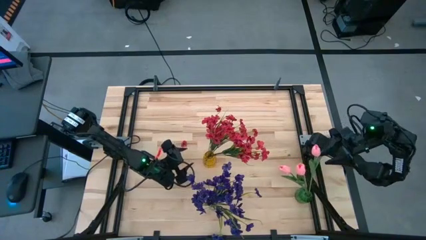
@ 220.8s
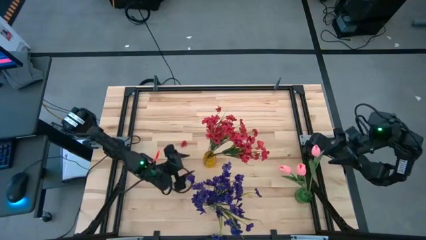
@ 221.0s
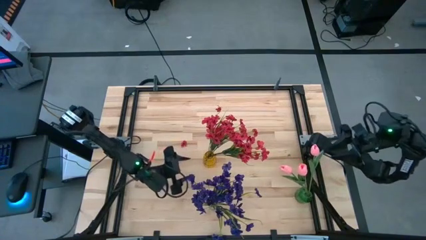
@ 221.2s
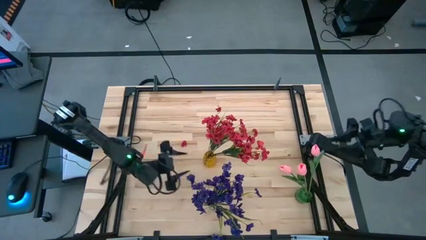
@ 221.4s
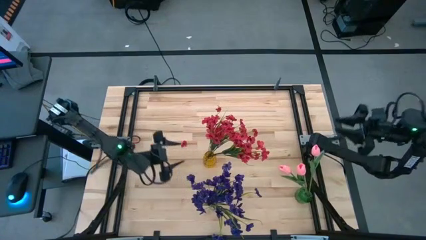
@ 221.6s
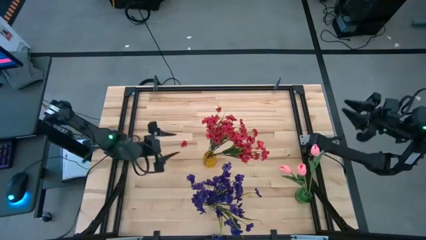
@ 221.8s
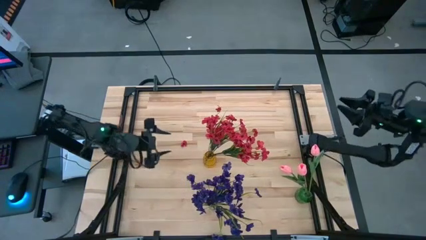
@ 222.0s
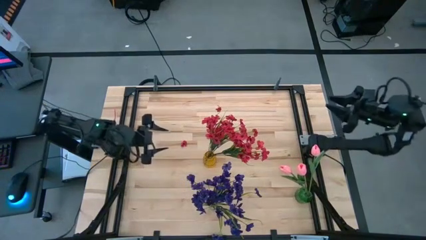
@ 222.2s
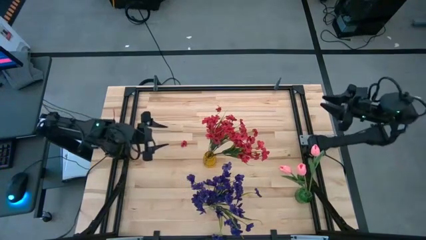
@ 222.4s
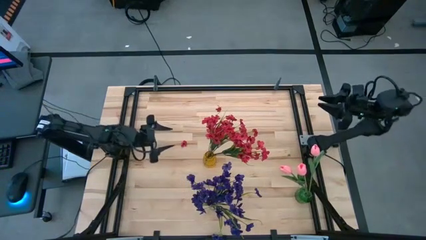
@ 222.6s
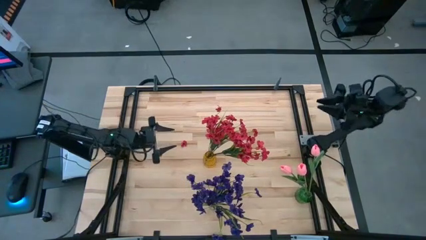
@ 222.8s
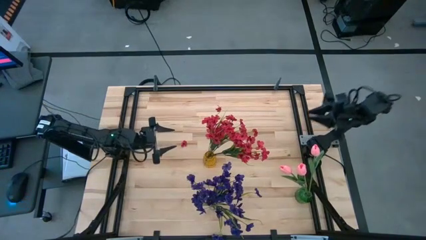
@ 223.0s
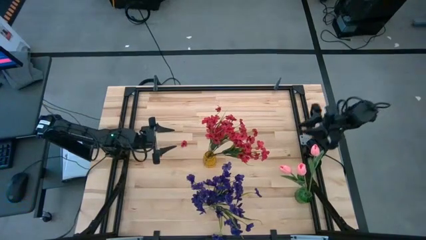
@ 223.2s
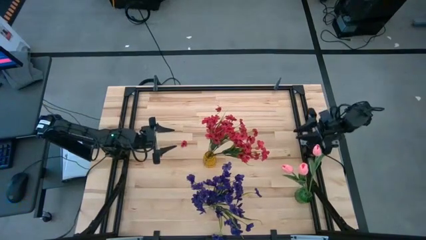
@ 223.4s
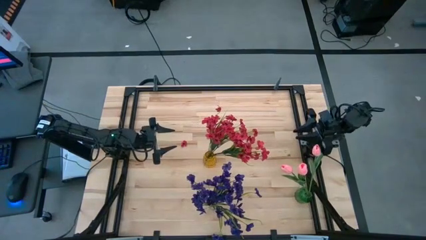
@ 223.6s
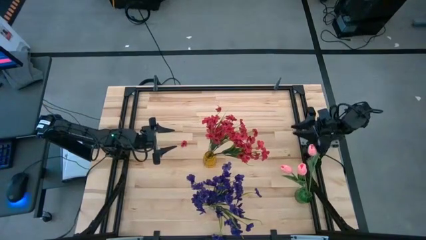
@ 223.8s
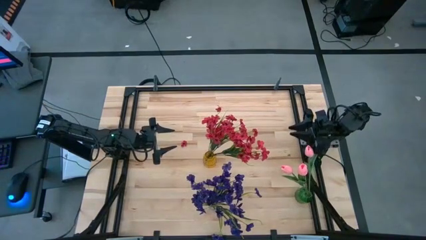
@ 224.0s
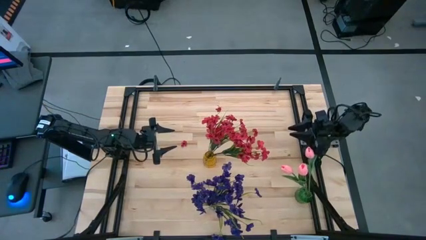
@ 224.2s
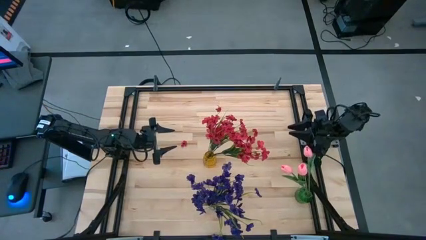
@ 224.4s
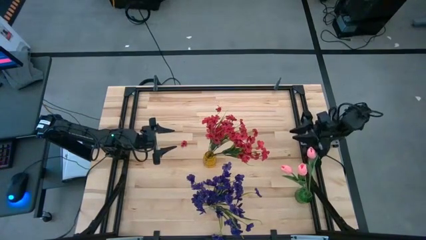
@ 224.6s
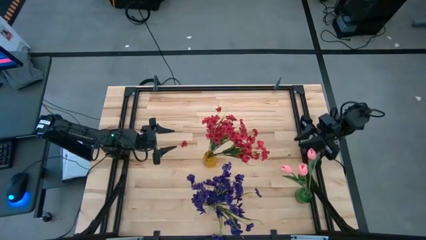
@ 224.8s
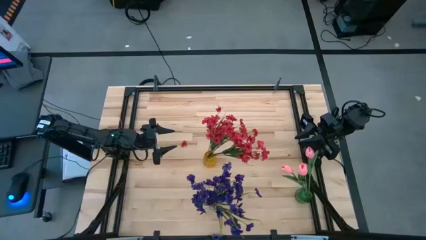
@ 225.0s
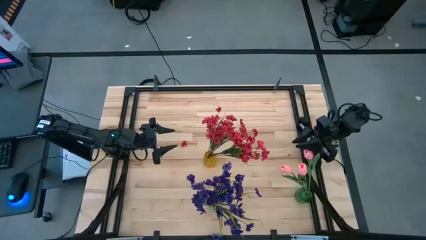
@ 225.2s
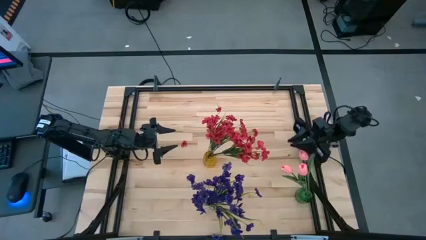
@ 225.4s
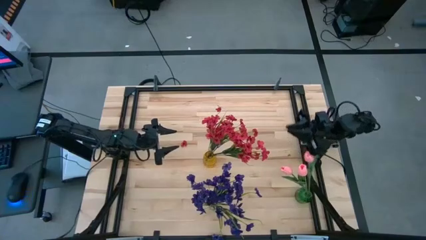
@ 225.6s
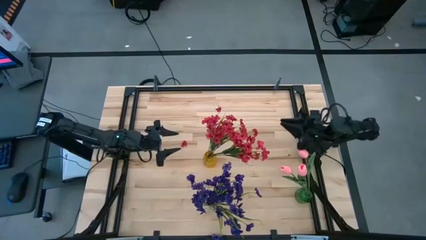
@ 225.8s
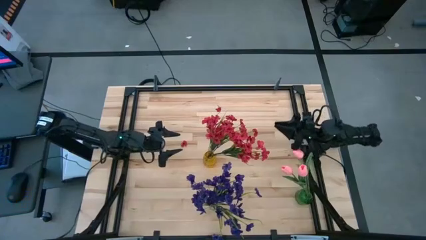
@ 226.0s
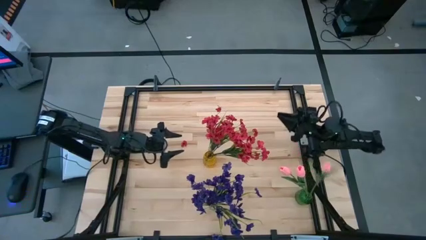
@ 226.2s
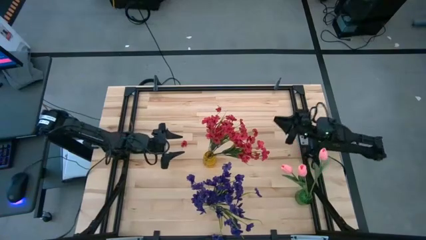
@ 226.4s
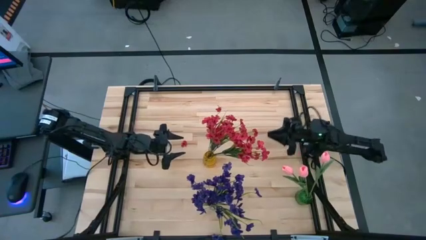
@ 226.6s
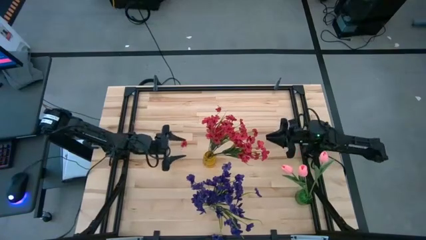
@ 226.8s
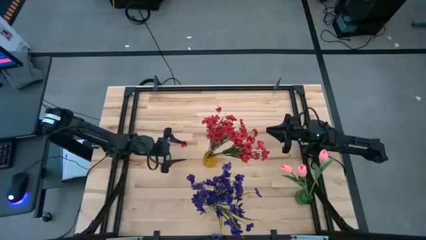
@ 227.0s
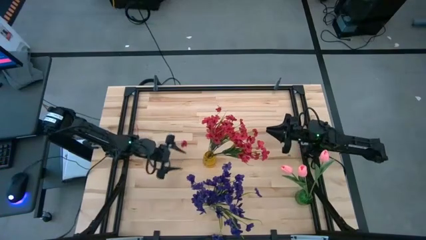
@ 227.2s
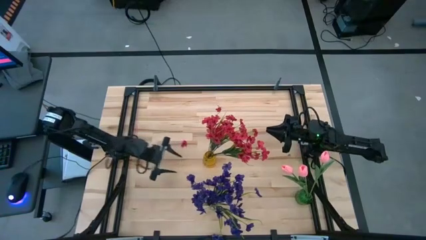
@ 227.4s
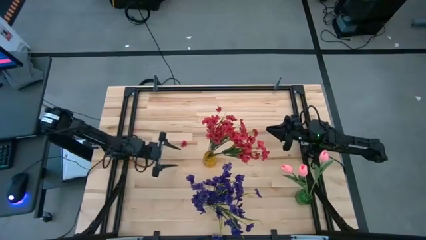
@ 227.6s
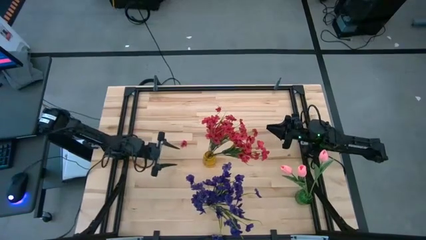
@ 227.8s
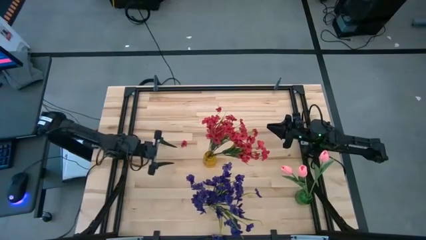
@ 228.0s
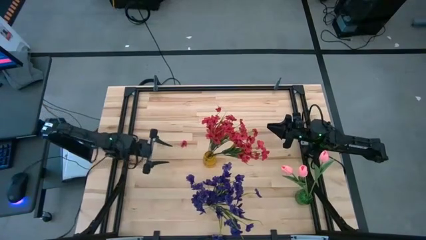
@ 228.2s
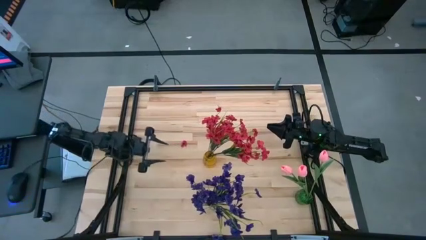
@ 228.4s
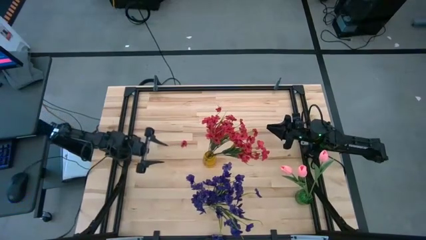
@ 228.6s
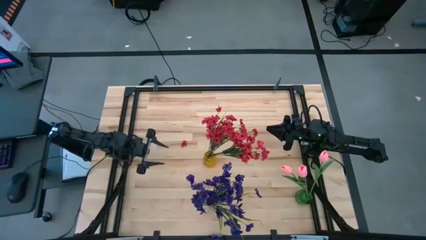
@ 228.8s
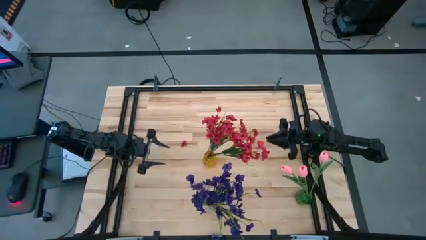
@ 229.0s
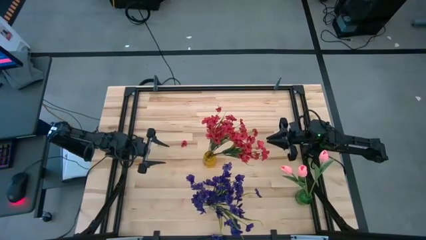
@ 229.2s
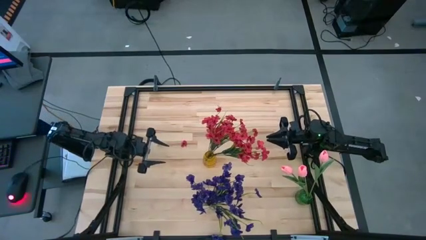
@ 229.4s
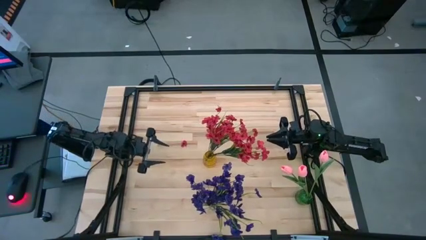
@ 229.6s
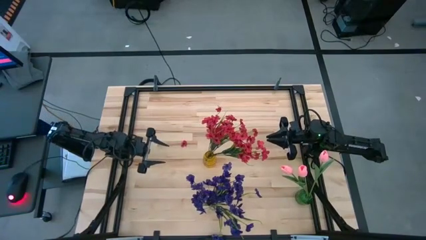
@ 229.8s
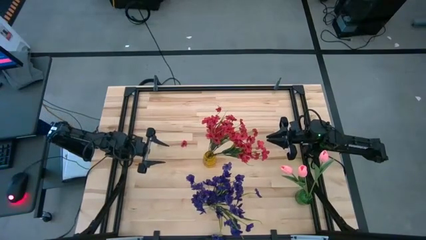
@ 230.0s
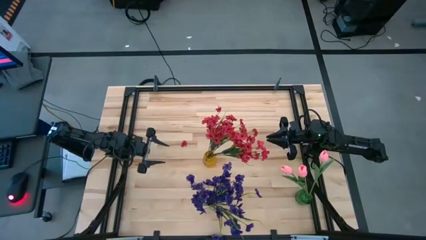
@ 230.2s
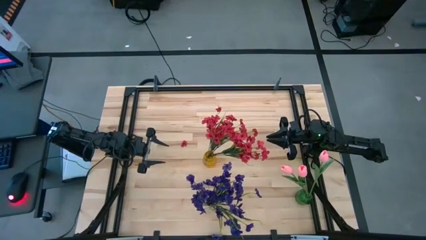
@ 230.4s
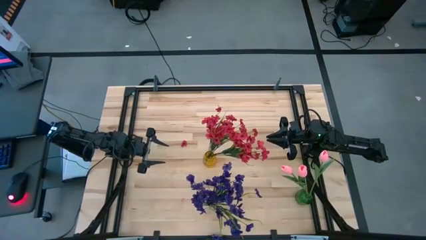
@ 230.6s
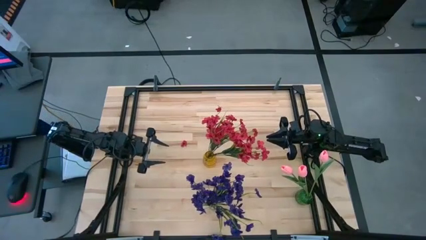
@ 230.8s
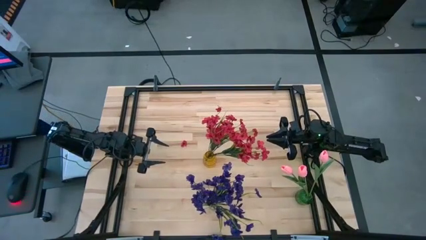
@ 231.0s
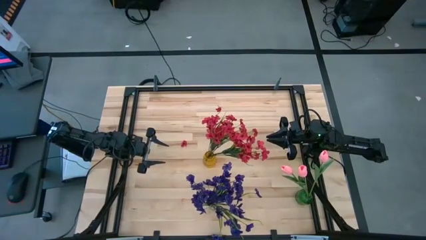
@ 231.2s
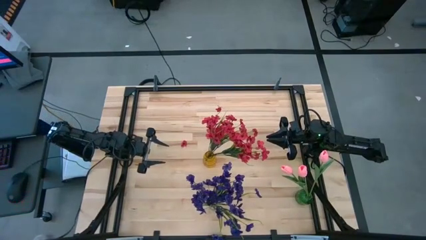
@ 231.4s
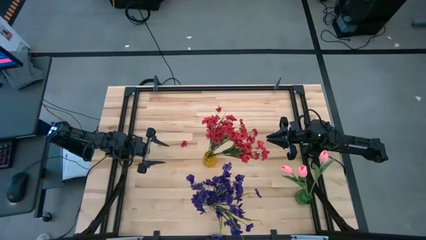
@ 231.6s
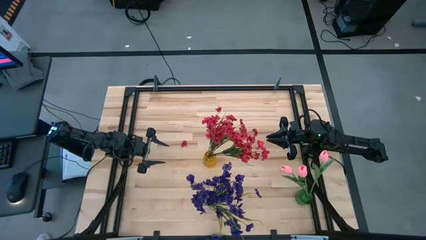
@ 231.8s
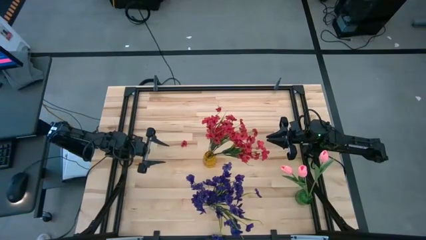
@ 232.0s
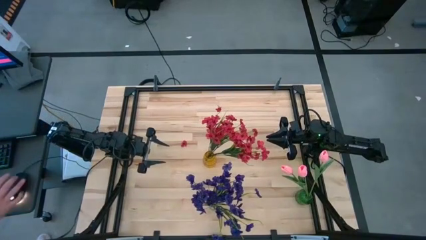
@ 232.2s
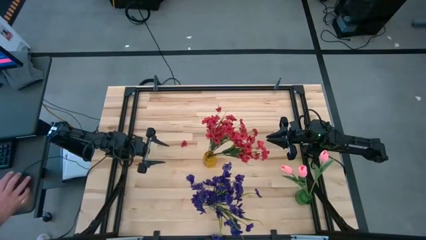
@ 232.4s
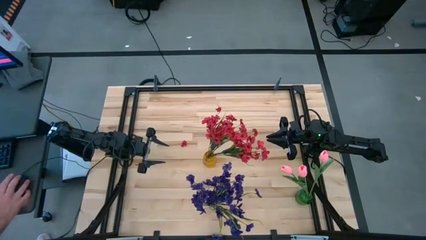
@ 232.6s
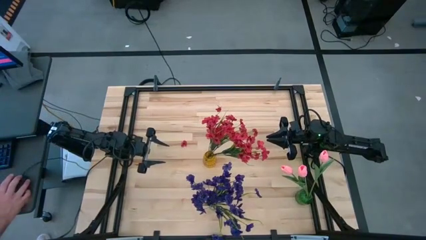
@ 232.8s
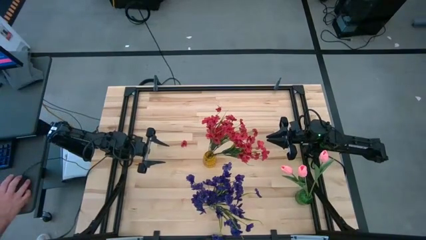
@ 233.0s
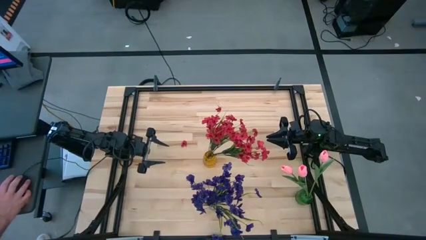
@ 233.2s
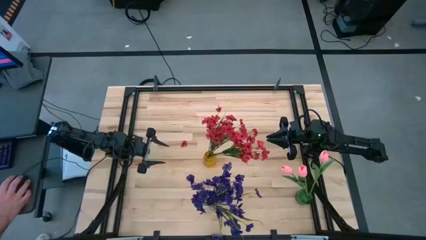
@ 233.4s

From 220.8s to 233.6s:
Task: Sort flowers into vase by color
Return to Home Position
